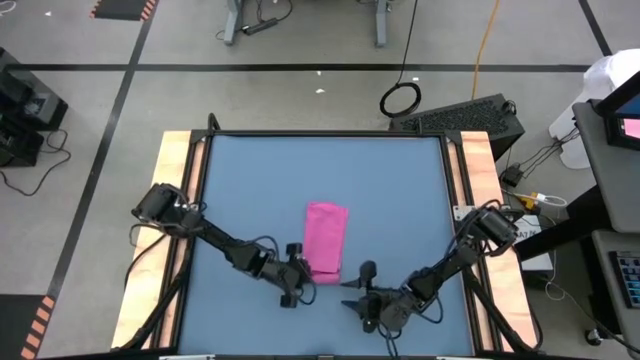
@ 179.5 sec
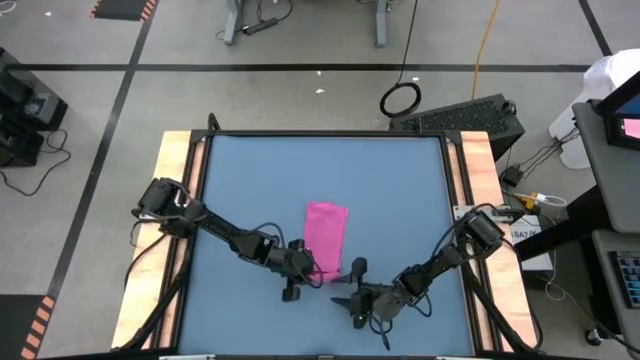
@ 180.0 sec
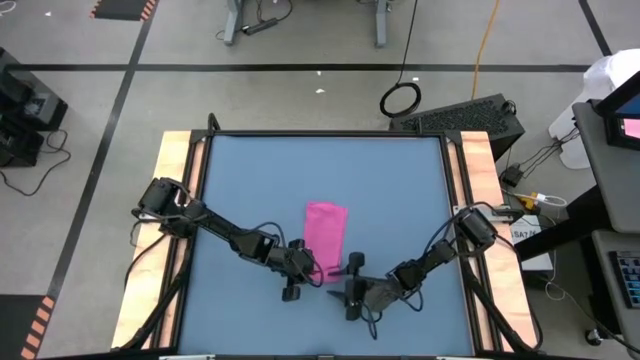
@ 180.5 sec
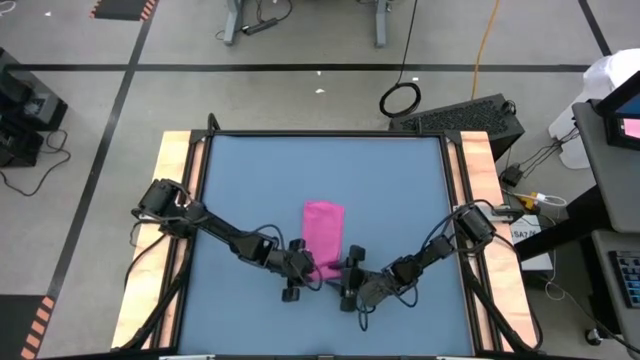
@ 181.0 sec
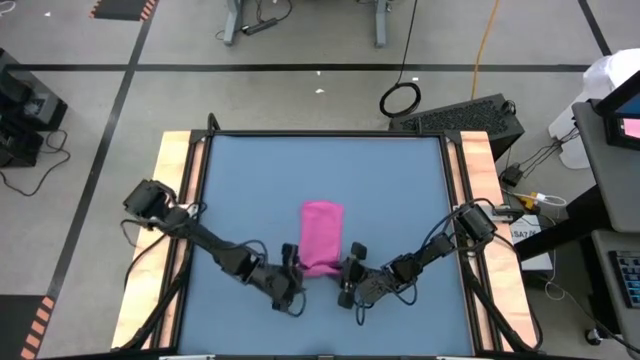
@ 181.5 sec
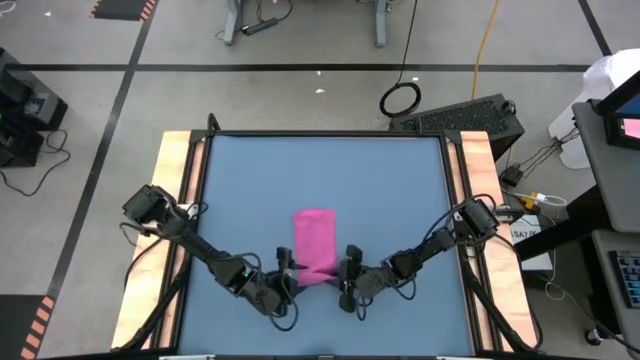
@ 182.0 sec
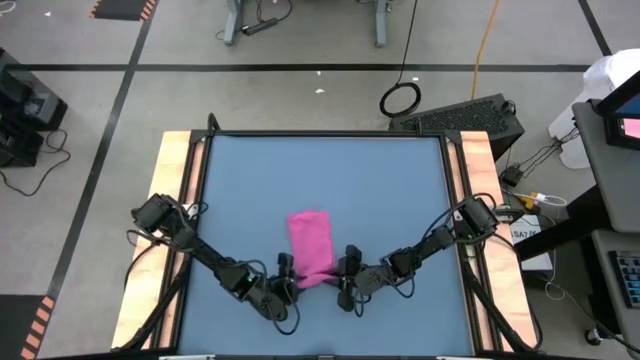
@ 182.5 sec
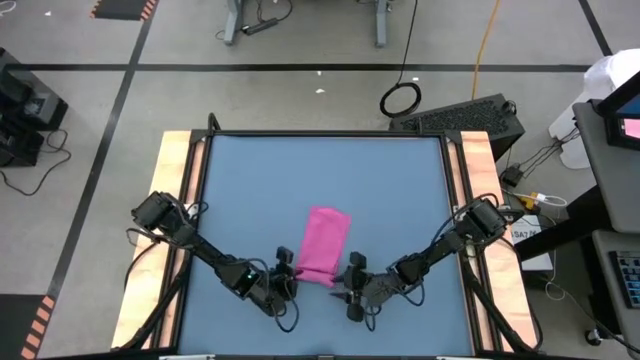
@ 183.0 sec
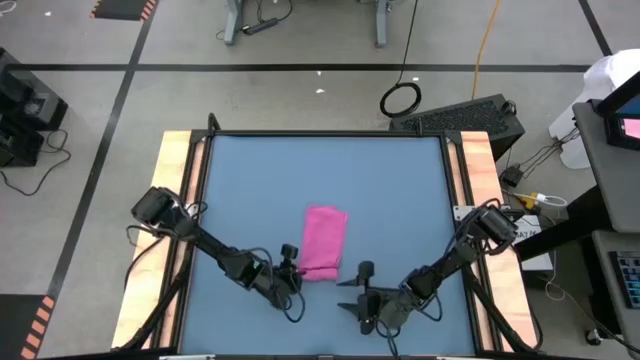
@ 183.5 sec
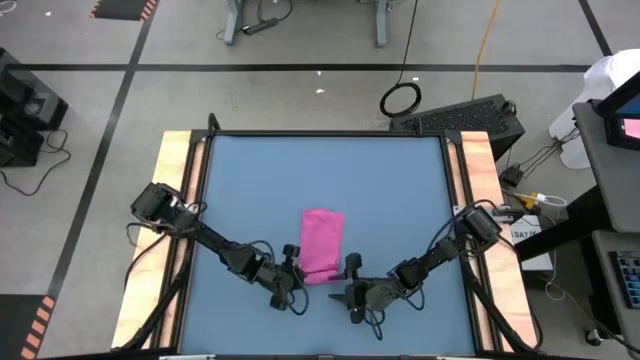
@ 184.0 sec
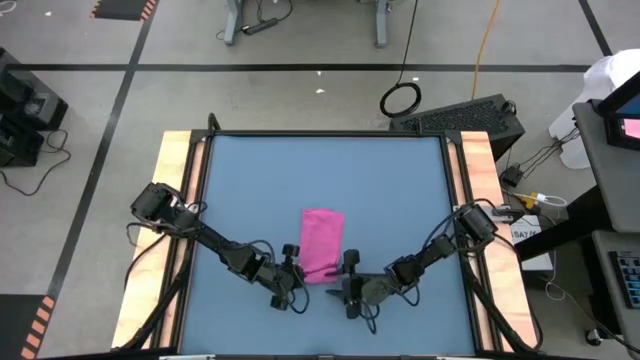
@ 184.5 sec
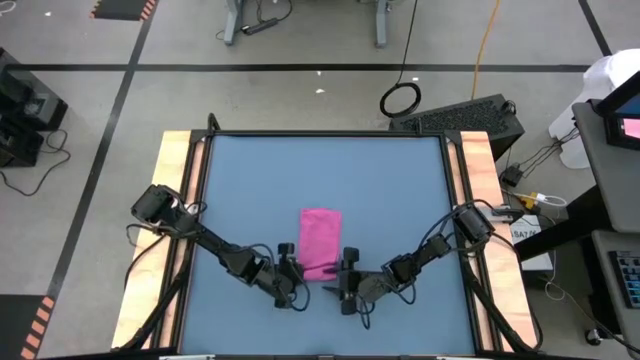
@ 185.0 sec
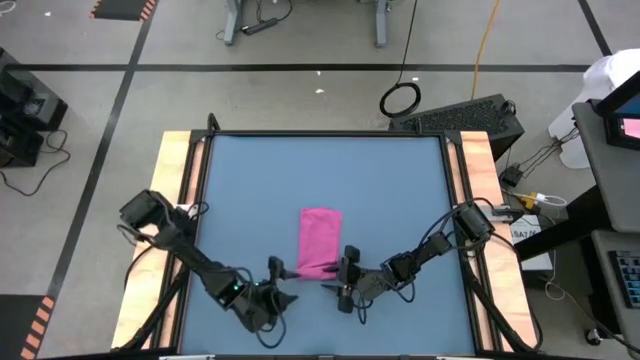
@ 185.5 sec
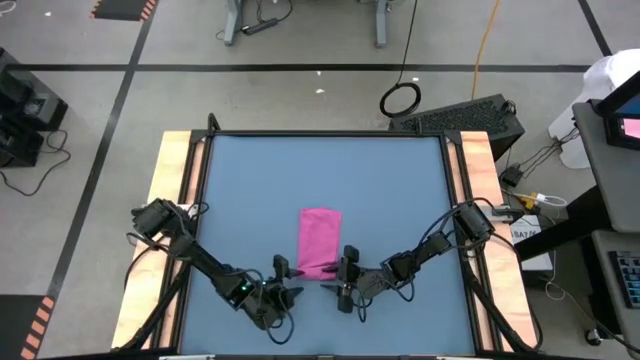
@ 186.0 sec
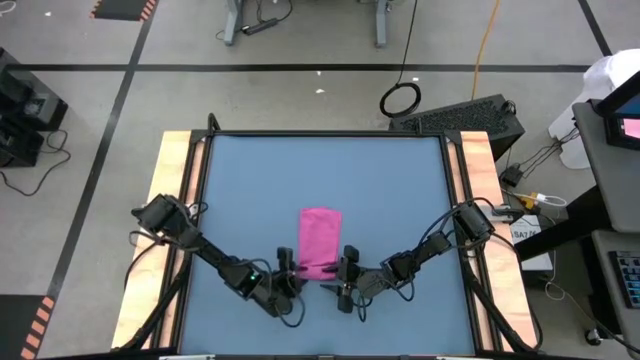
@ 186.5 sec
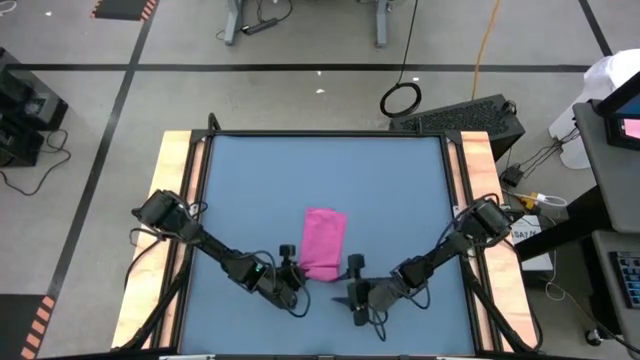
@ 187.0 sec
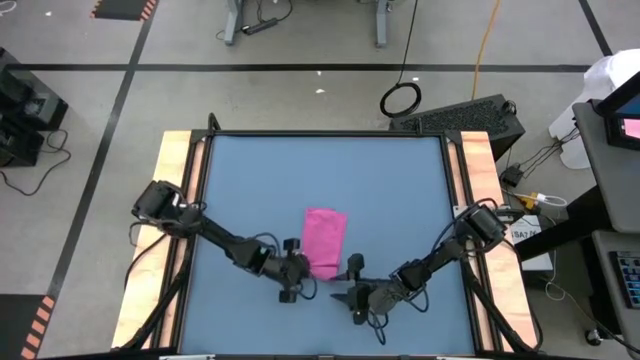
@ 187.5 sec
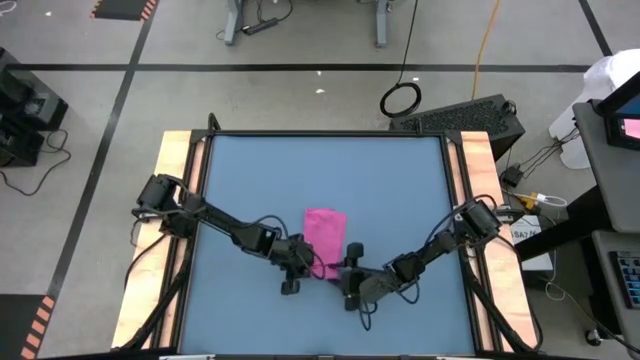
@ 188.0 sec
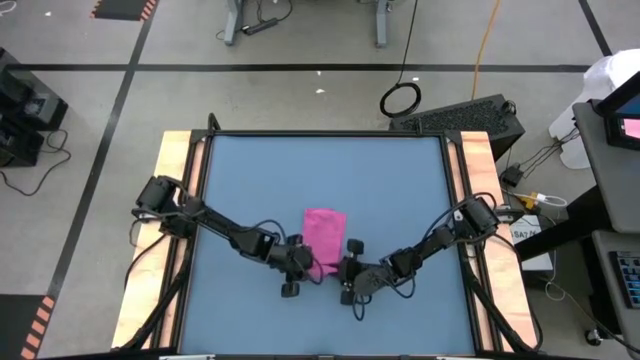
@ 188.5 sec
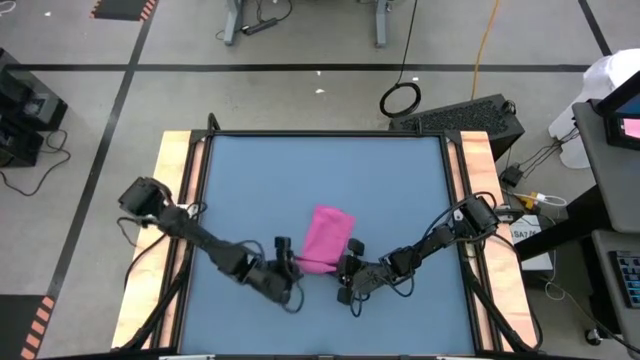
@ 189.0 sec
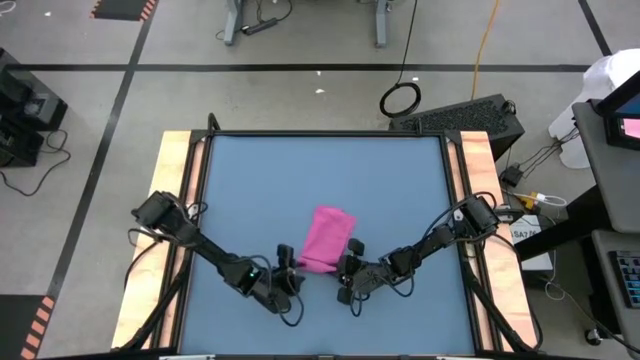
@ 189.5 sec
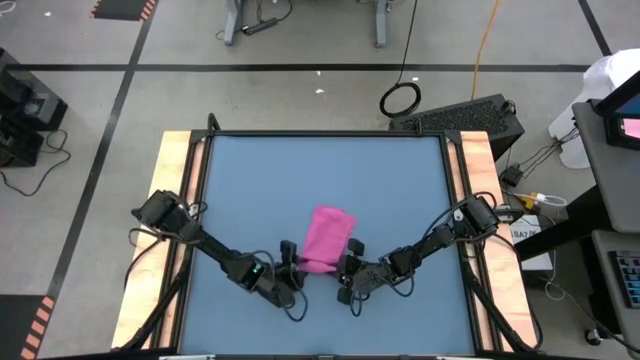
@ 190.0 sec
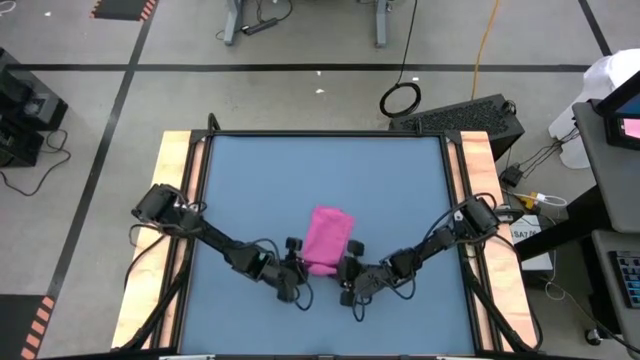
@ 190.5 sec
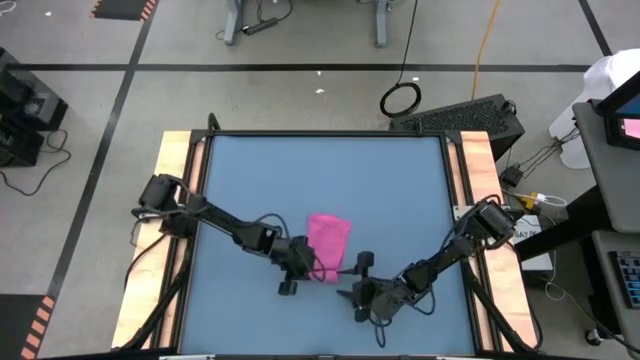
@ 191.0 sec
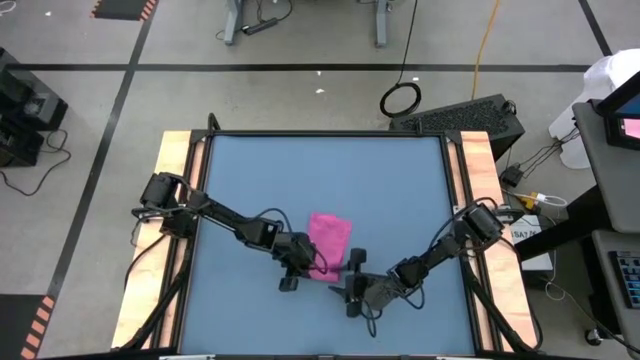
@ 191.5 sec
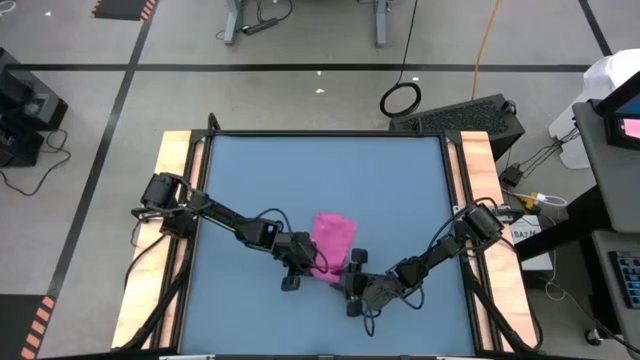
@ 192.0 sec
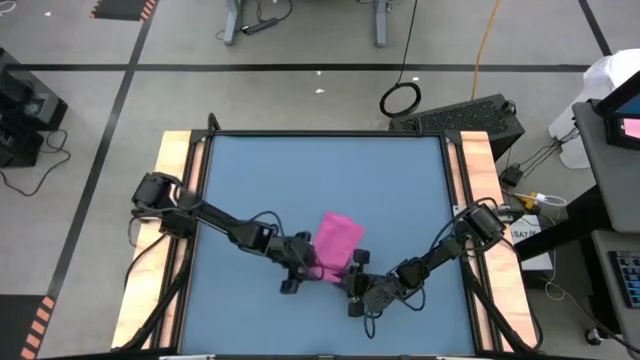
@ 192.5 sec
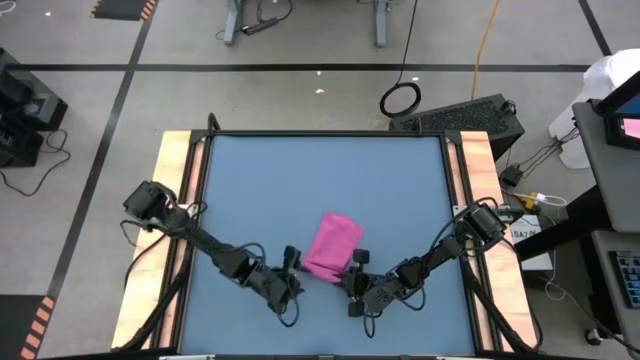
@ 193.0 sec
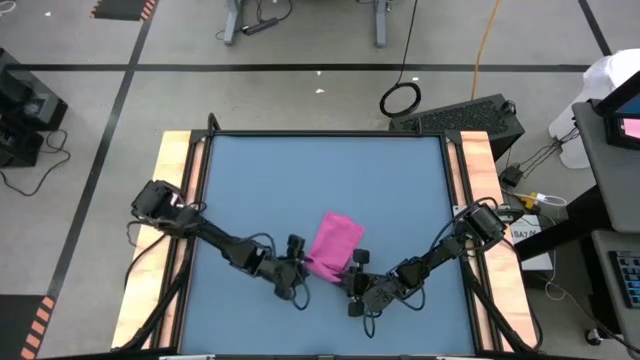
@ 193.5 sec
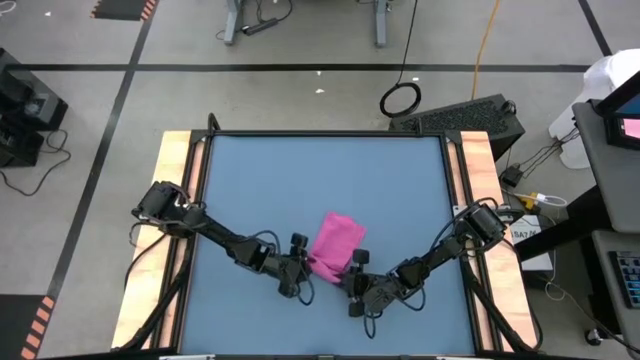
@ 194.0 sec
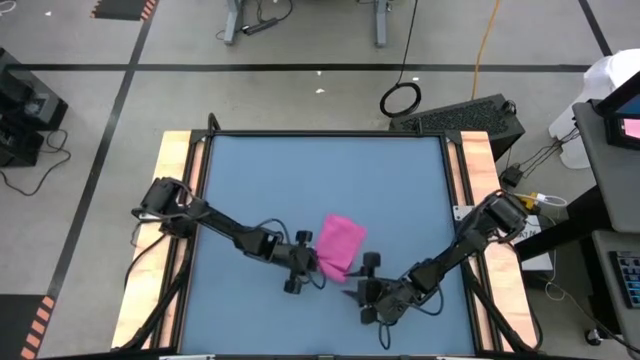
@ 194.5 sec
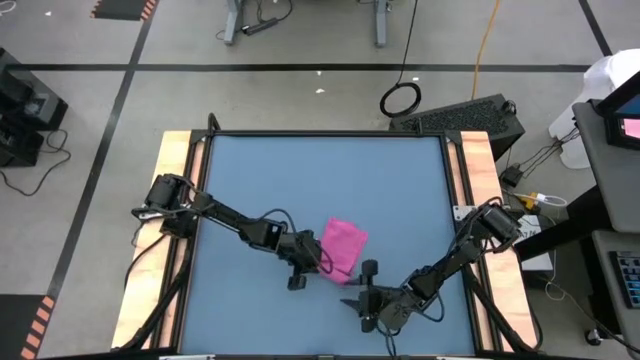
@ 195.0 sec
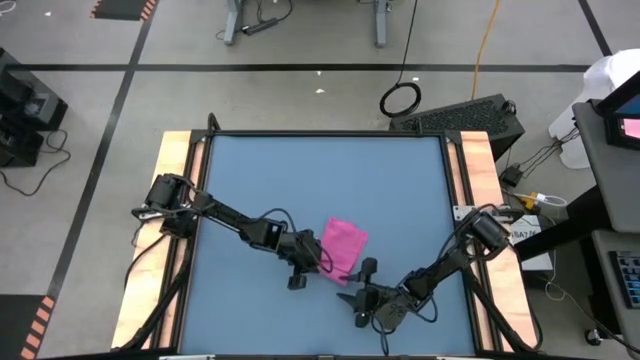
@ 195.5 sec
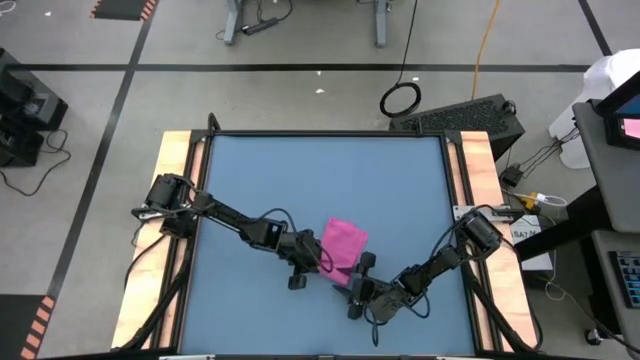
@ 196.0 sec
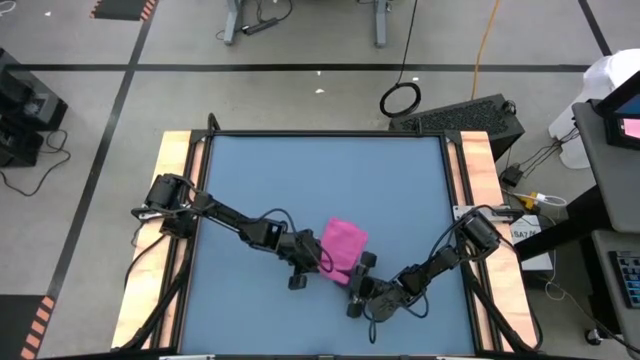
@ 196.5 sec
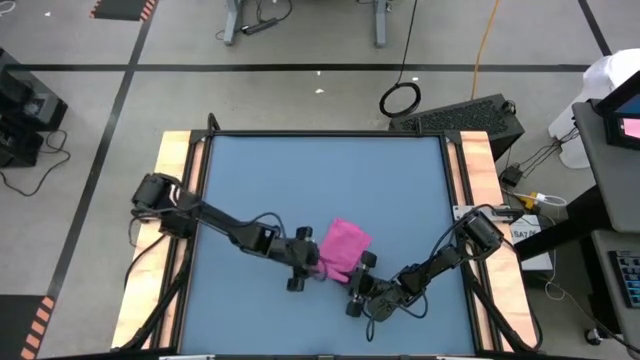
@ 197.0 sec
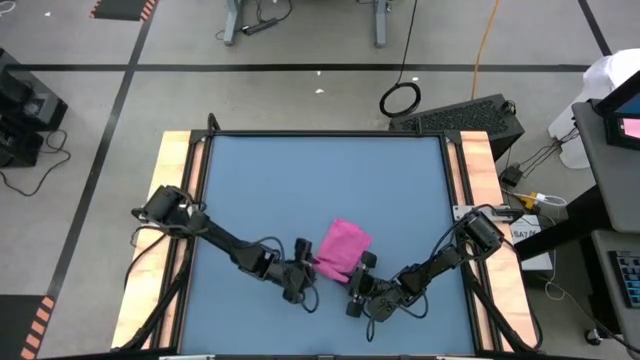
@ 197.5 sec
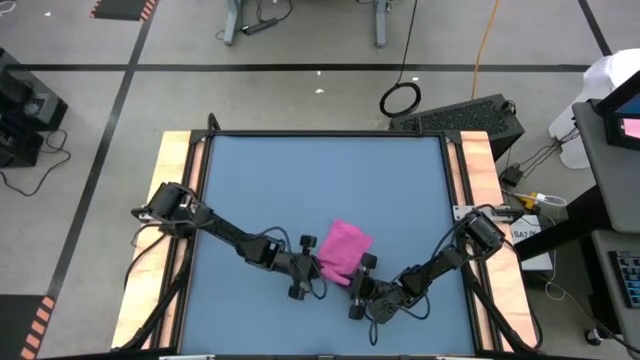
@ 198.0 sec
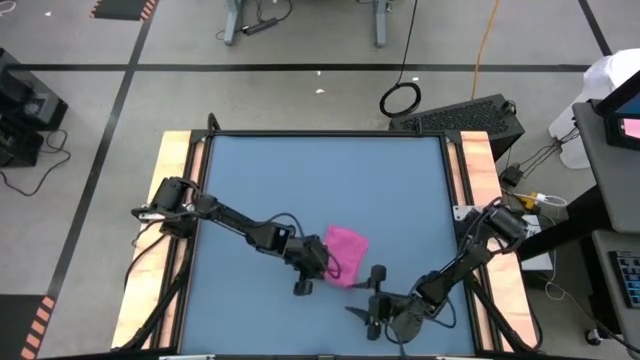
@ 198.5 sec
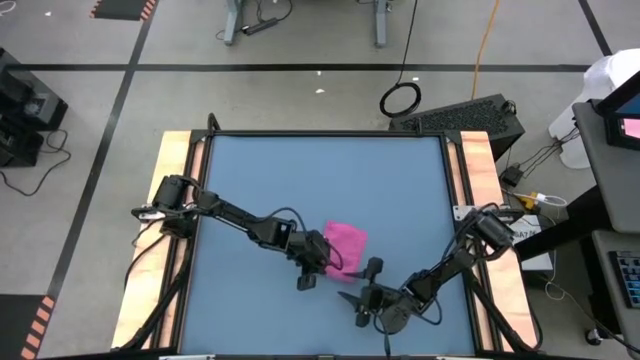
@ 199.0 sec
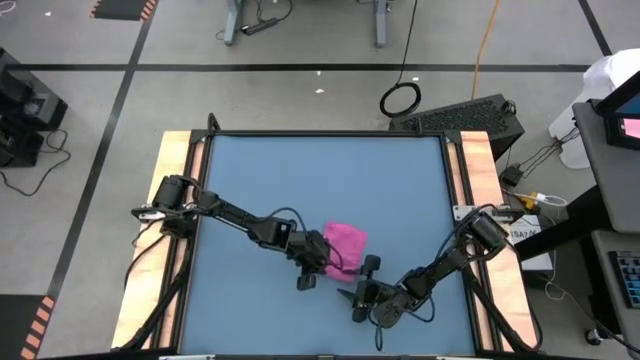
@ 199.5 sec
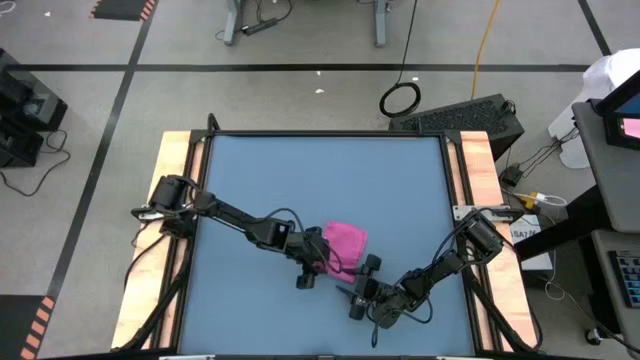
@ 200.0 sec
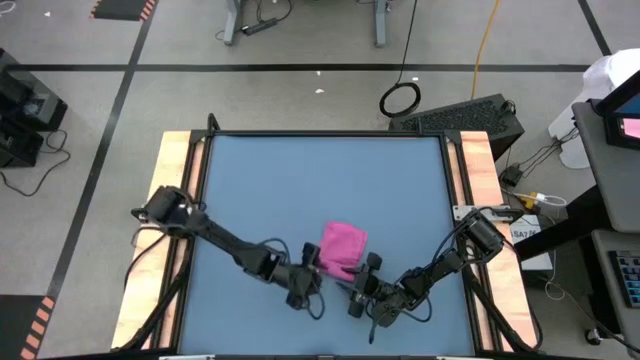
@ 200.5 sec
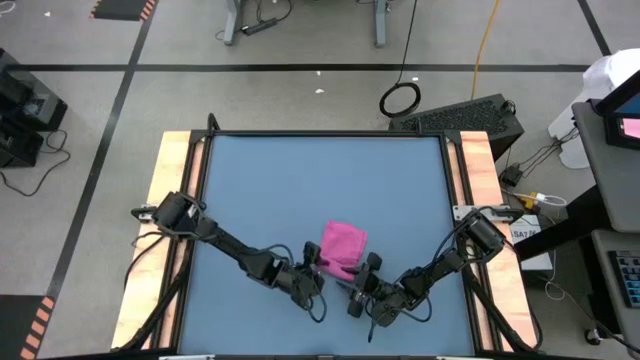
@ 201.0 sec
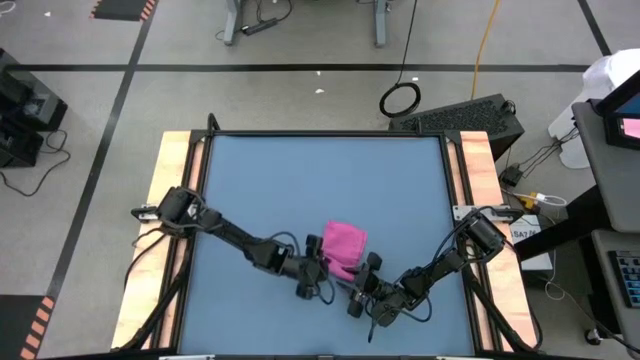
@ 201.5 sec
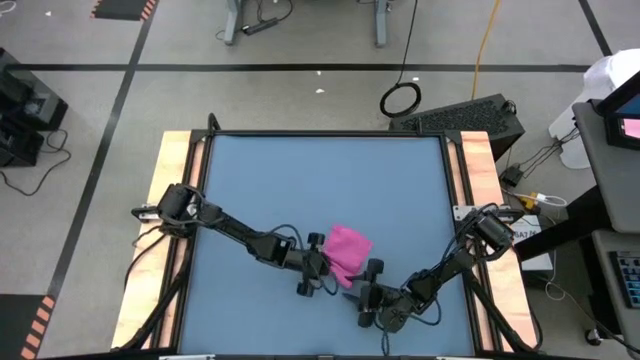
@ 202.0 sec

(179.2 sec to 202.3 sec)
Task: Roll towel into tight, uniform cylinder
Roll the pink towel
